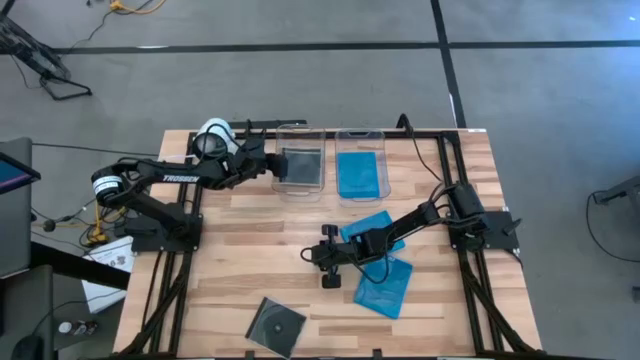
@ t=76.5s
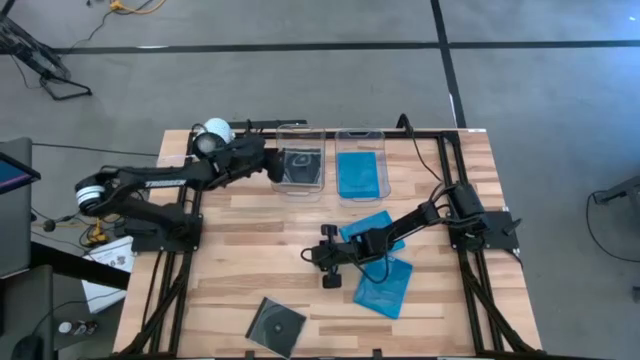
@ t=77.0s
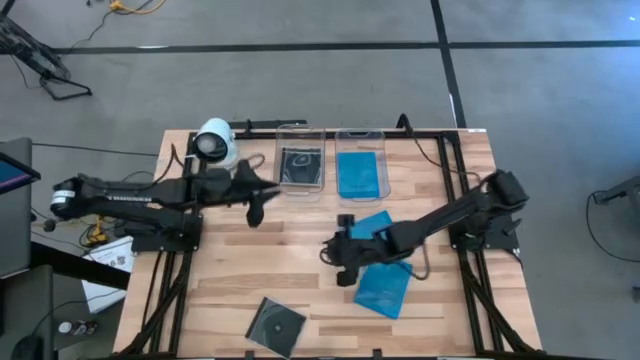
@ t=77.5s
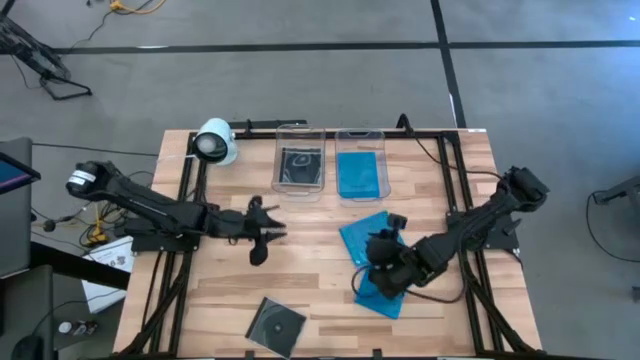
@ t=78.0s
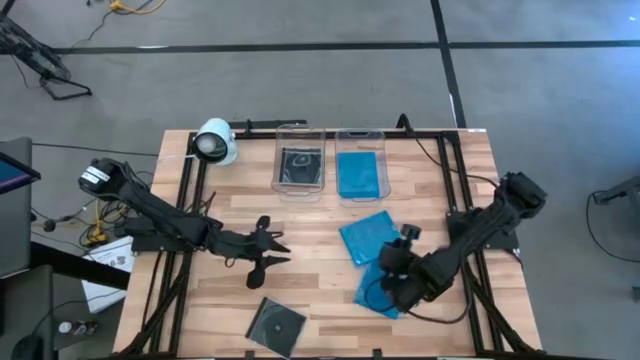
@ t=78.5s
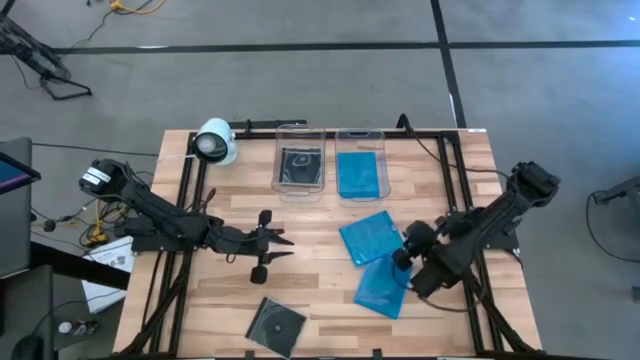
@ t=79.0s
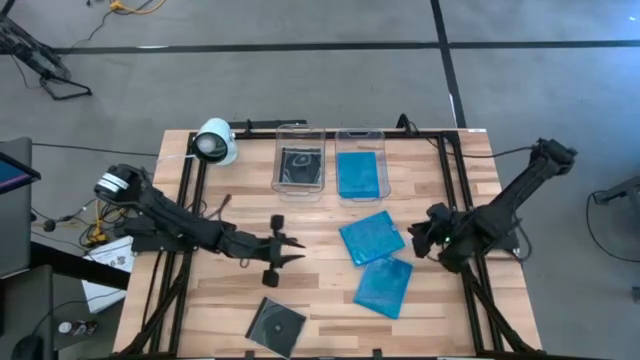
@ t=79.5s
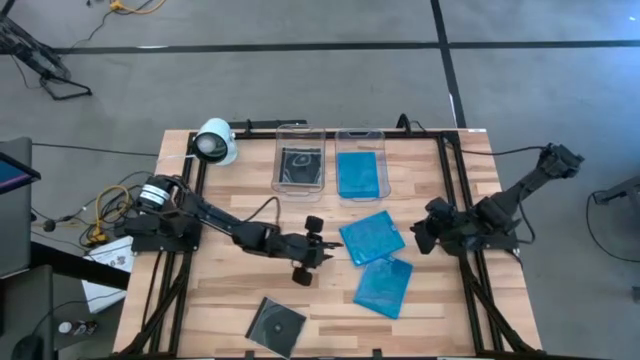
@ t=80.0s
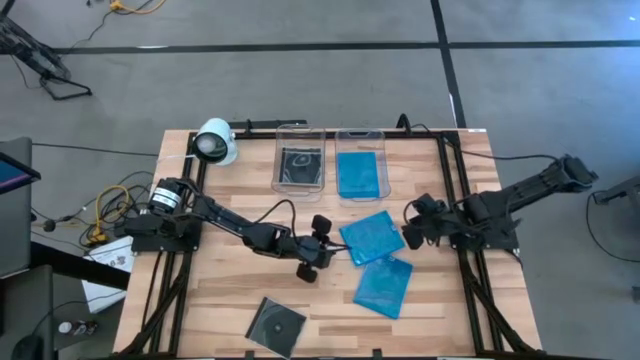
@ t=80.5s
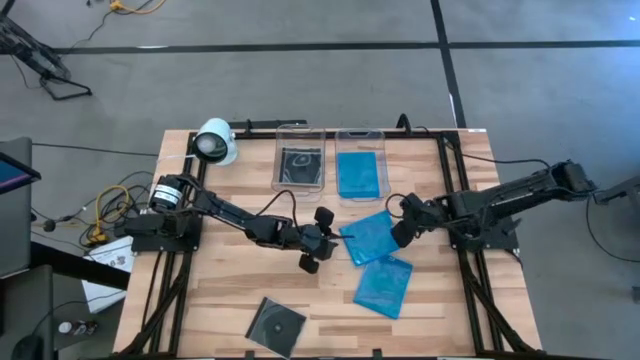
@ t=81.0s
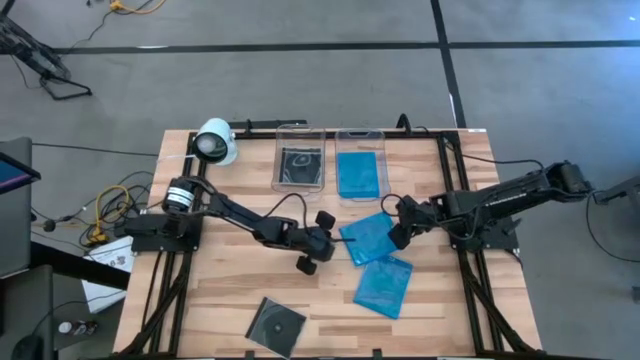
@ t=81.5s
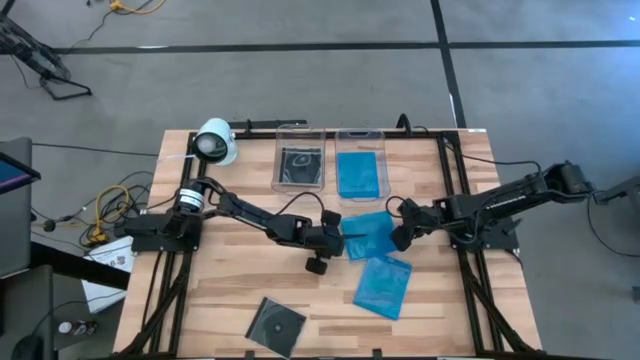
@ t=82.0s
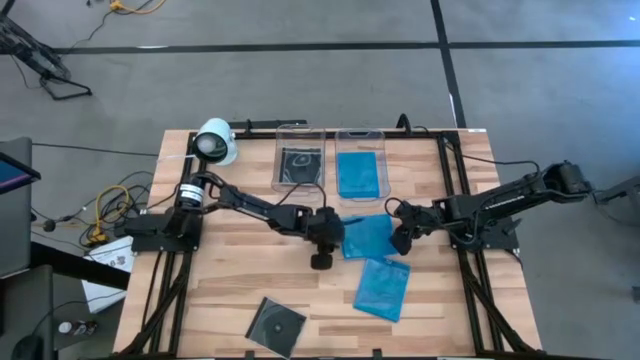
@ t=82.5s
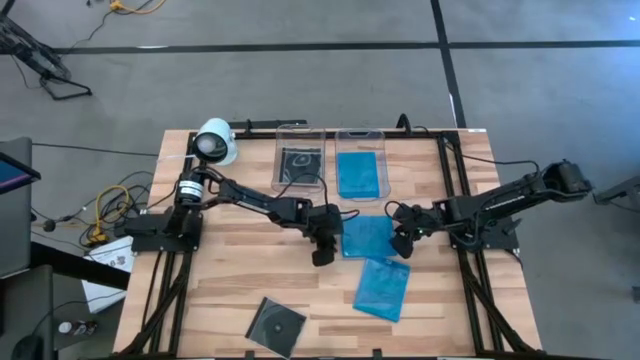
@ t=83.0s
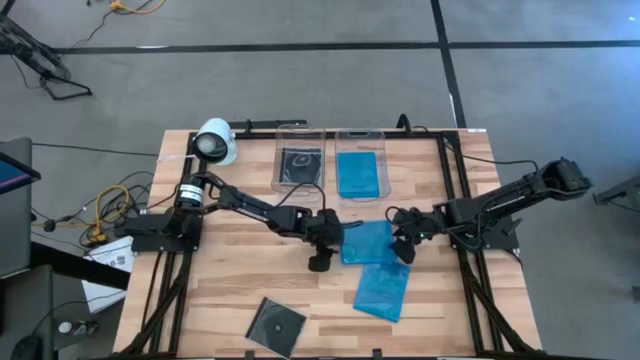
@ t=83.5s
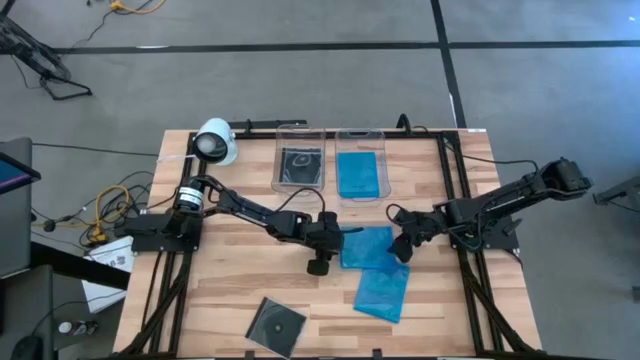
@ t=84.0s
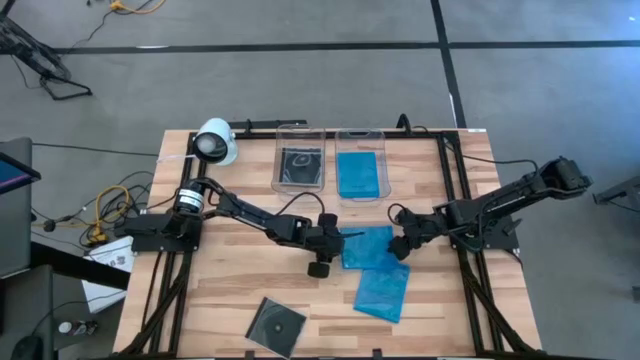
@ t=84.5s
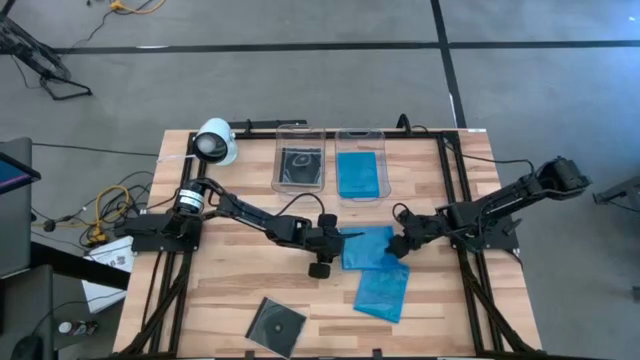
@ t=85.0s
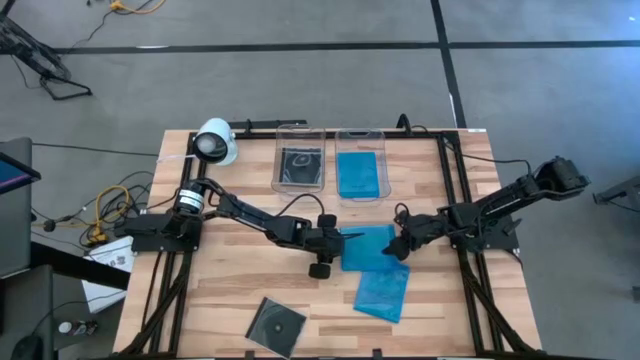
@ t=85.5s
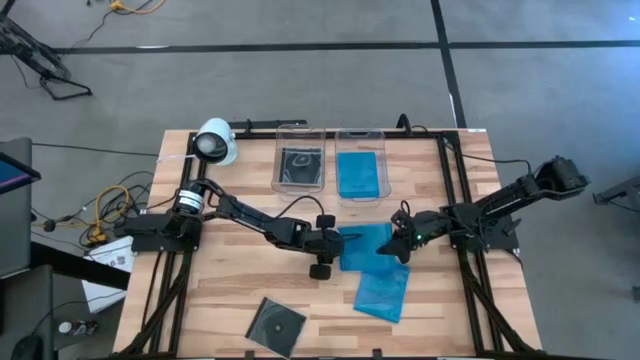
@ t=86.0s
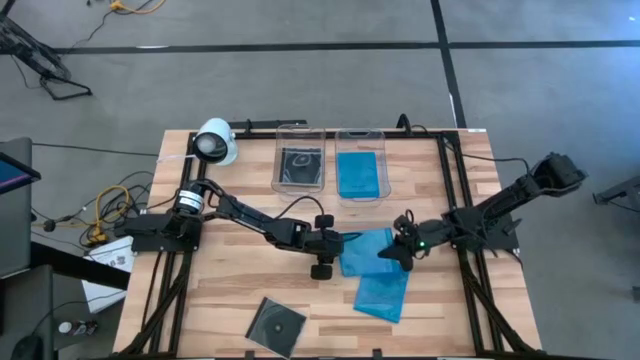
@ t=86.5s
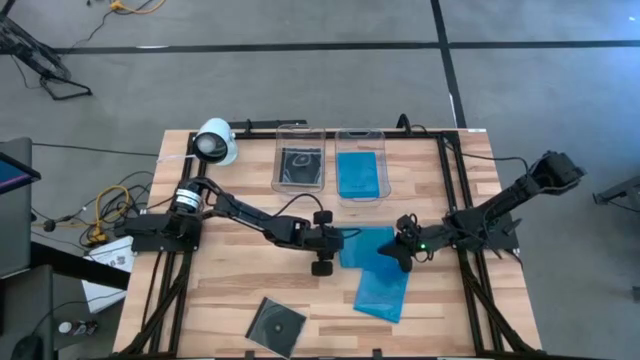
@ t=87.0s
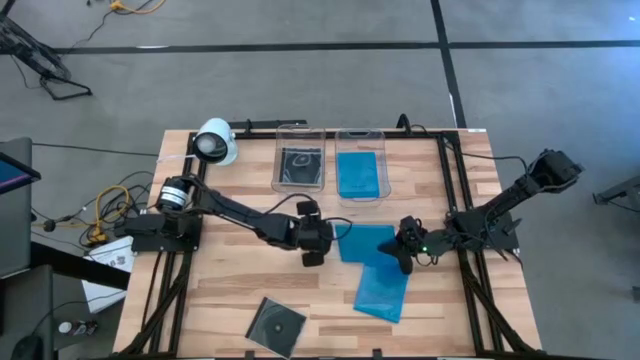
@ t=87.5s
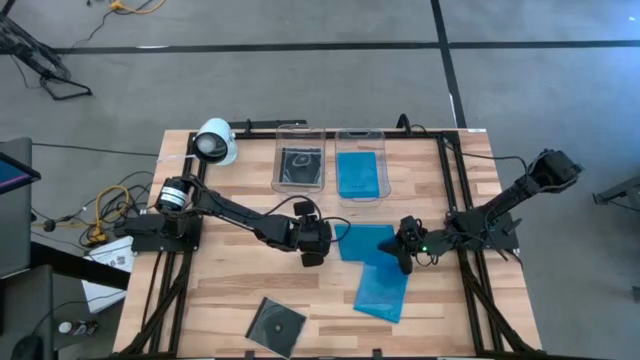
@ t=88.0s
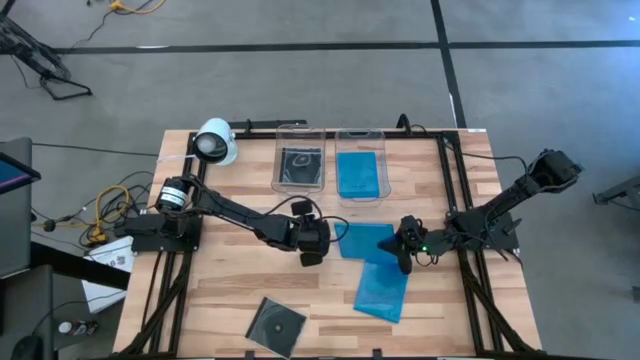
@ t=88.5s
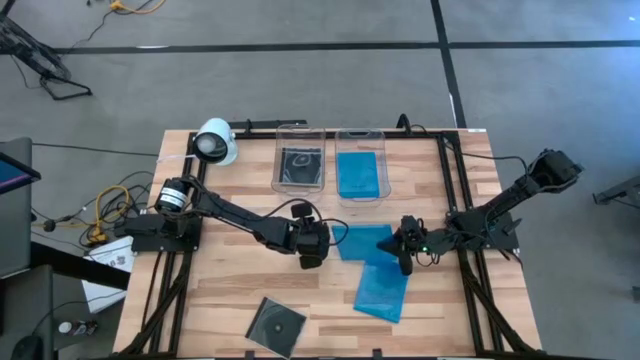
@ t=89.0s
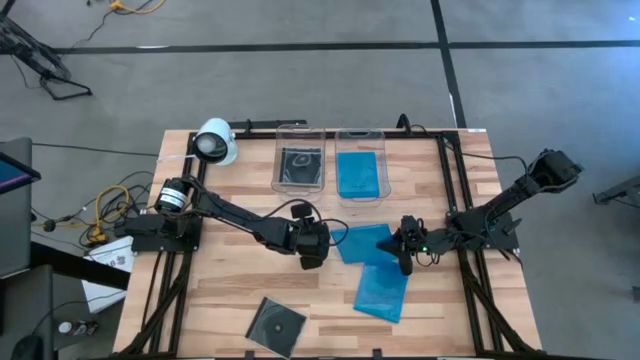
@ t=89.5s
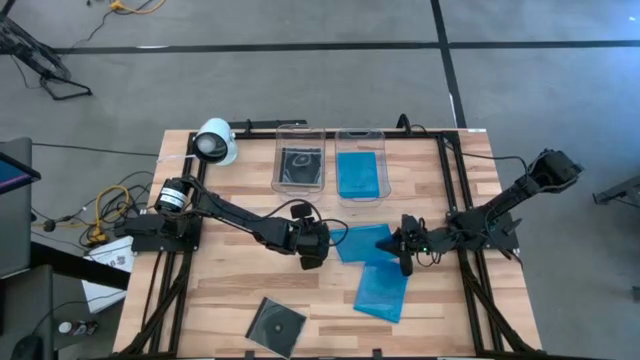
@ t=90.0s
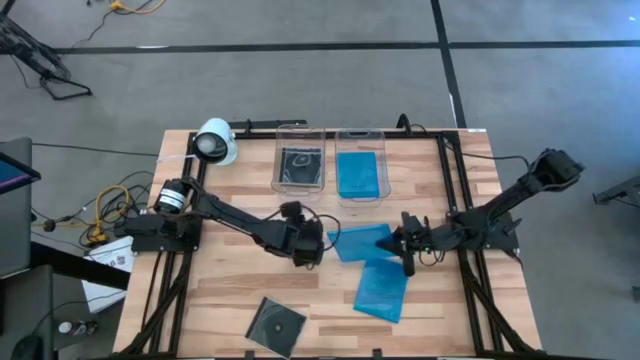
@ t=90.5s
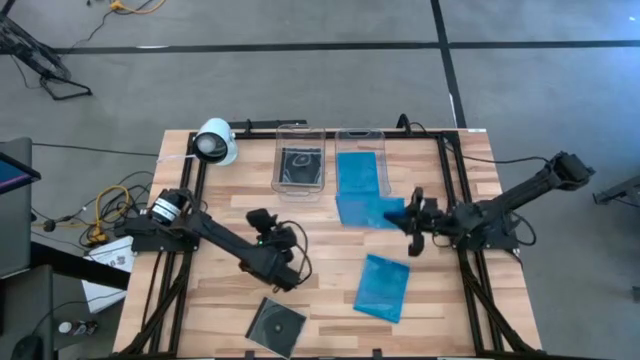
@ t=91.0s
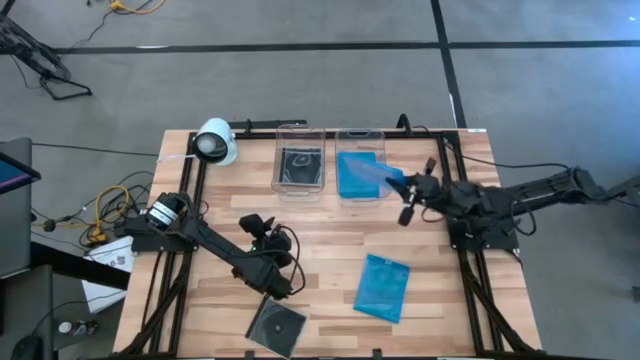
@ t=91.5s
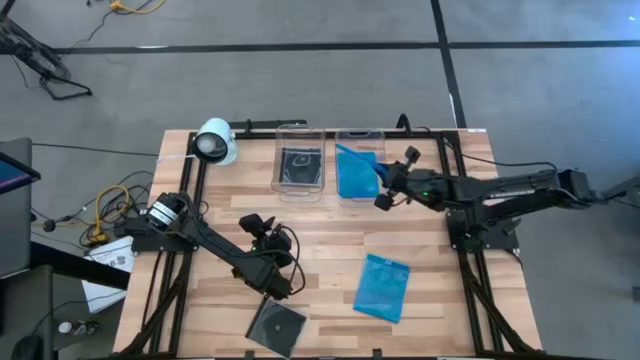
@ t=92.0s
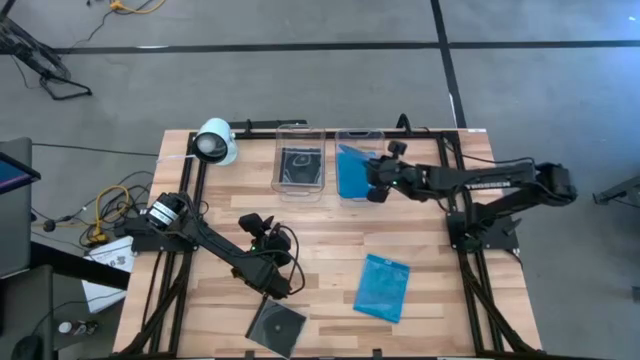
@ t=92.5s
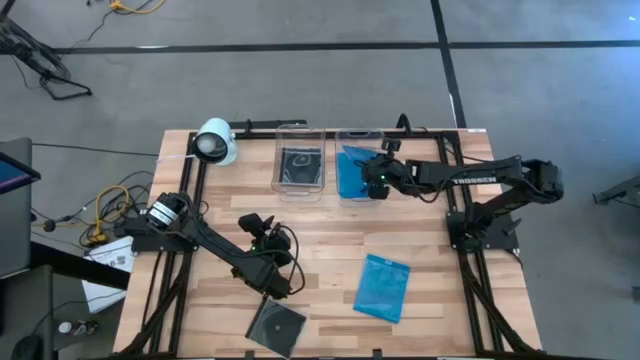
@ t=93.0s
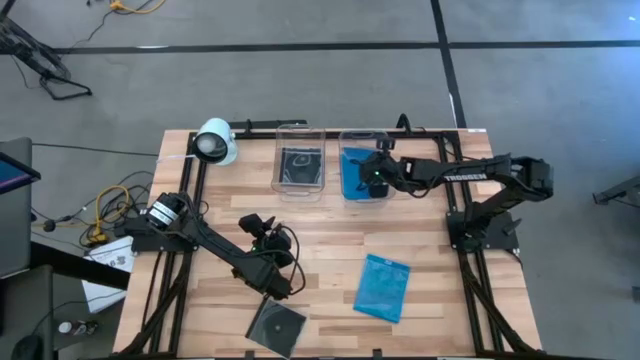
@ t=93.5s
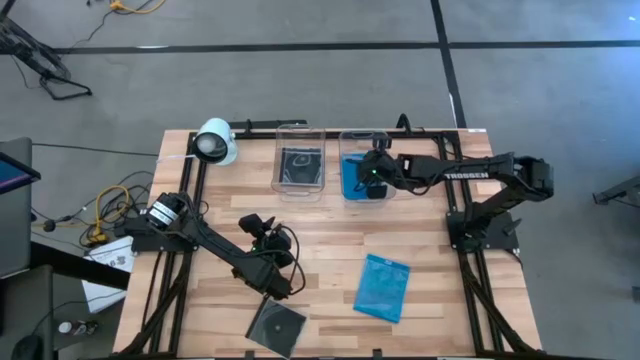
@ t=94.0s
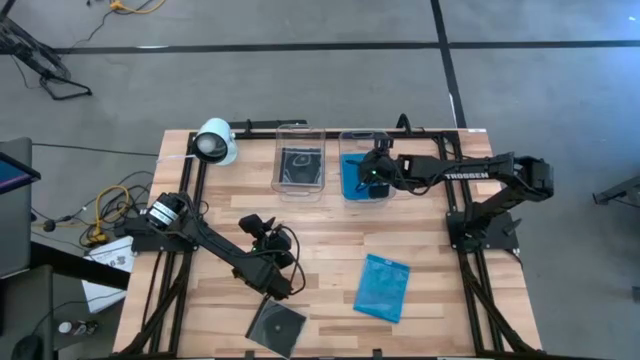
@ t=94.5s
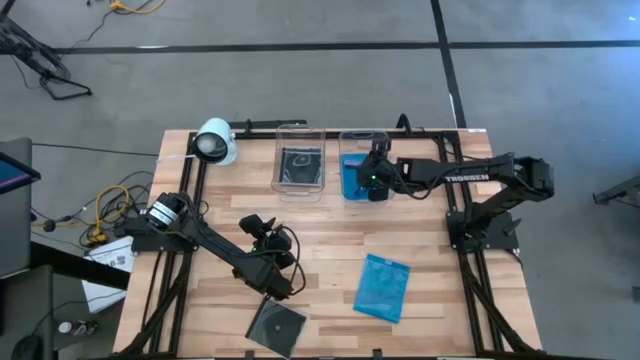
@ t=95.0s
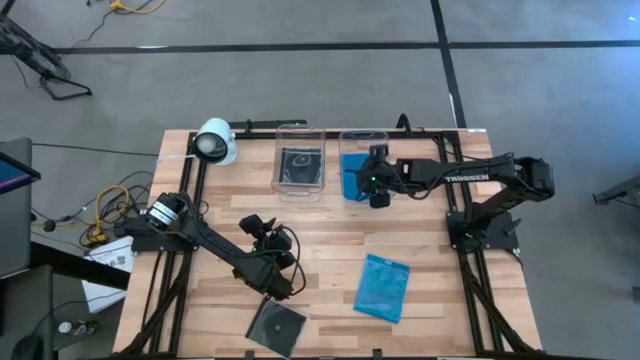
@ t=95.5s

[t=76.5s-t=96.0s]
Task: Pick & place jewel cases by type
Put the top blue CD case into the right transparent bin

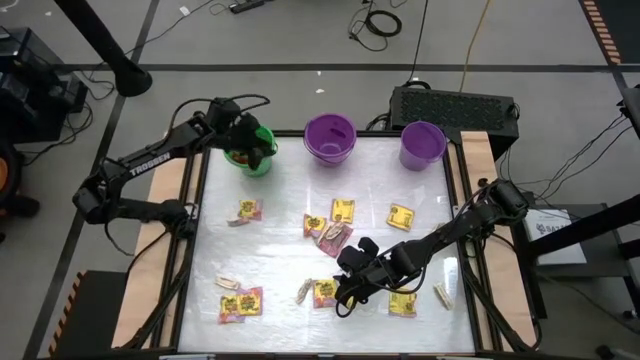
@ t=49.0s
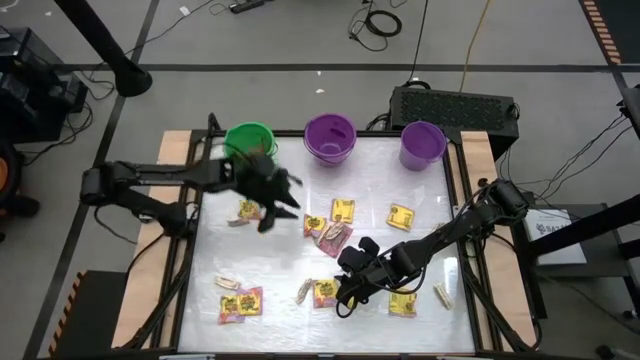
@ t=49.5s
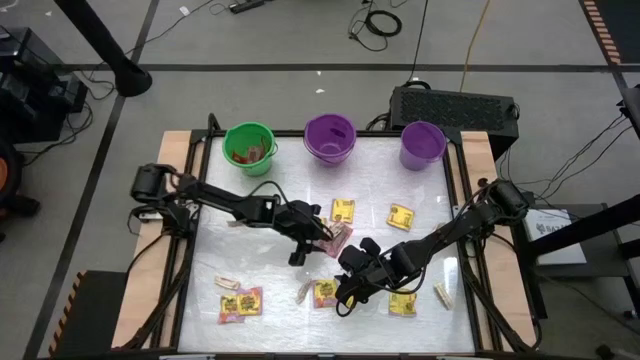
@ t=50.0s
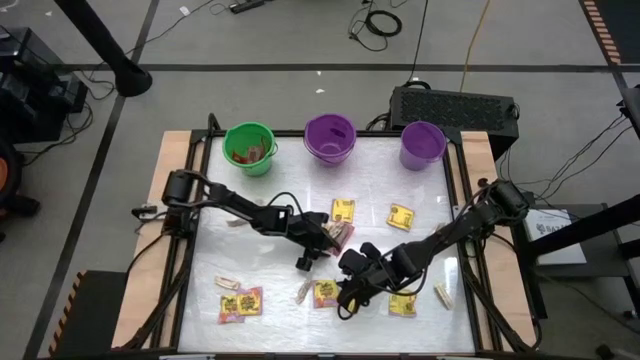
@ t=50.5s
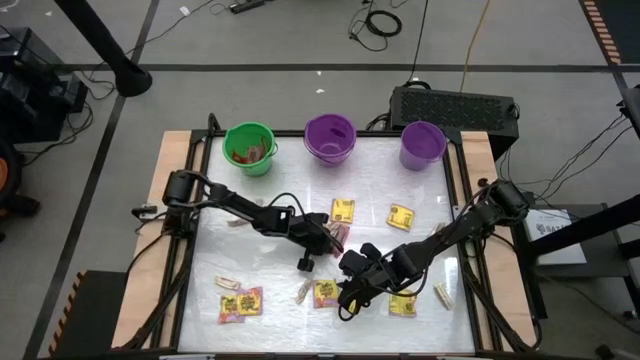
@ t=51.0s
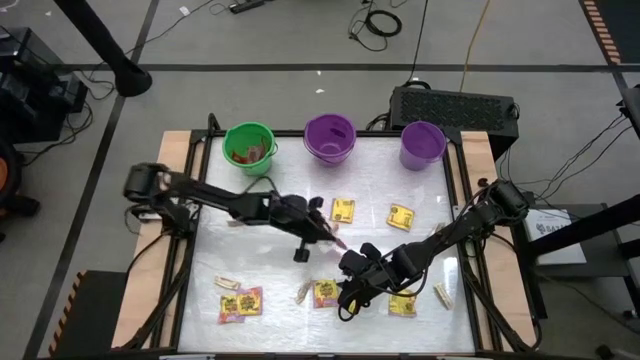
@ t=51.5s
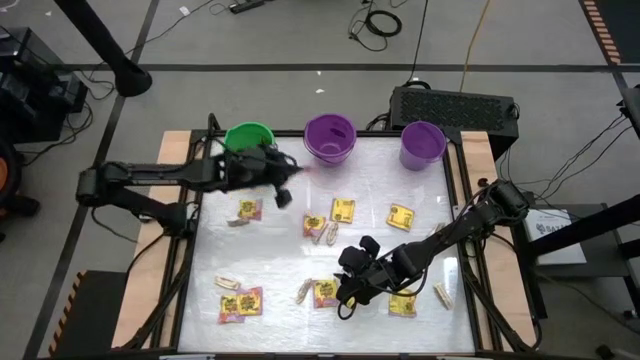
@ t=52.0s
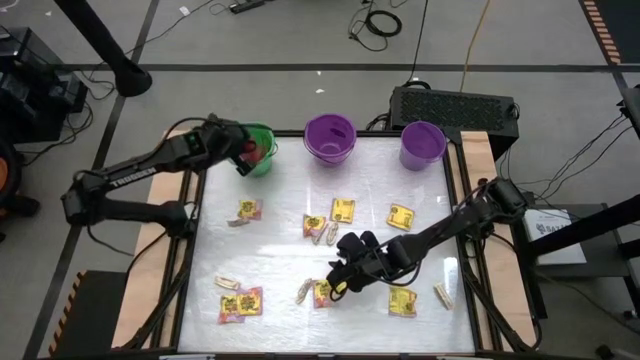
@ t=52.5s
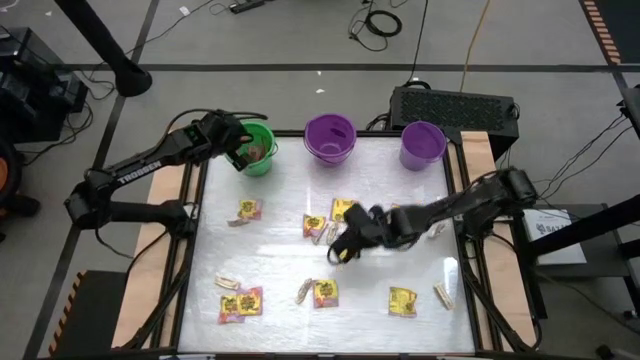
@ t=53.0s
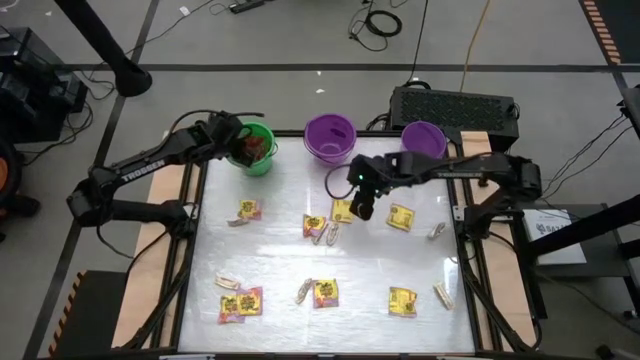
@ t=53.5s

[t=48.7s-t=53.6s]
Task: Sort candy by brand, put in halloween buckets
Put the red candy pack in the green bucket
